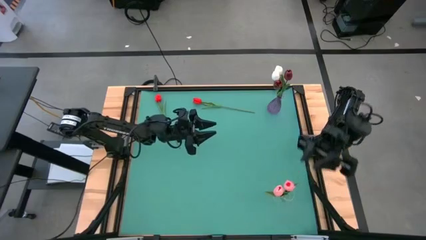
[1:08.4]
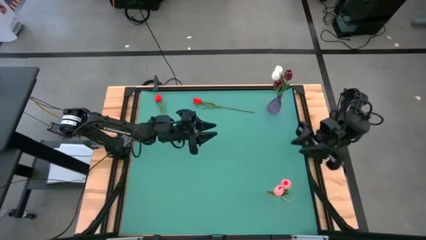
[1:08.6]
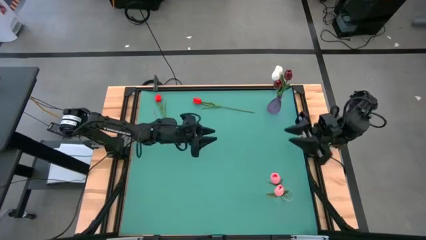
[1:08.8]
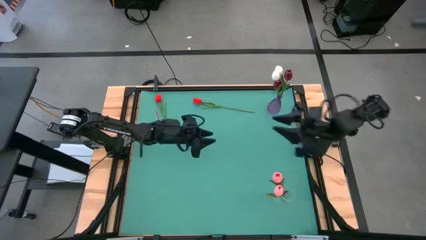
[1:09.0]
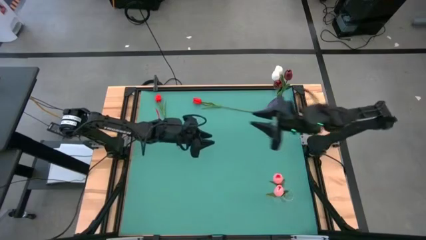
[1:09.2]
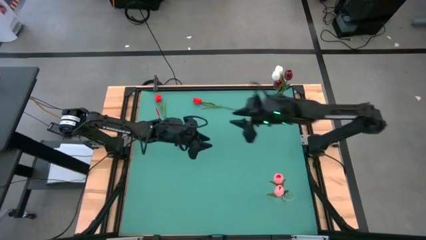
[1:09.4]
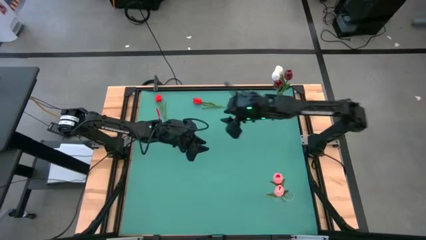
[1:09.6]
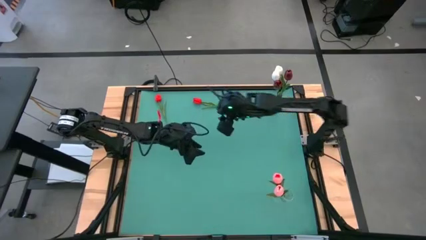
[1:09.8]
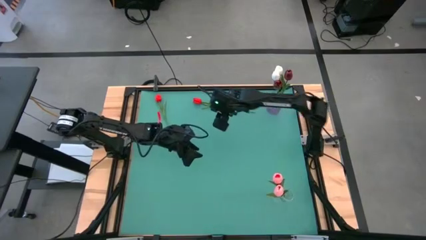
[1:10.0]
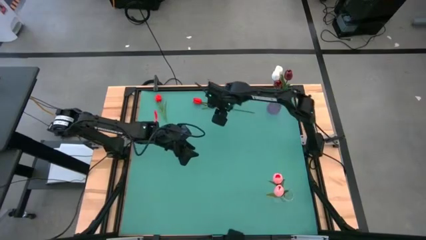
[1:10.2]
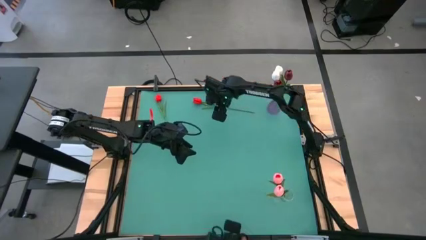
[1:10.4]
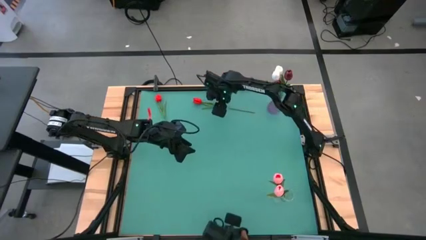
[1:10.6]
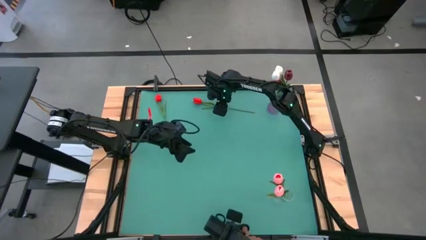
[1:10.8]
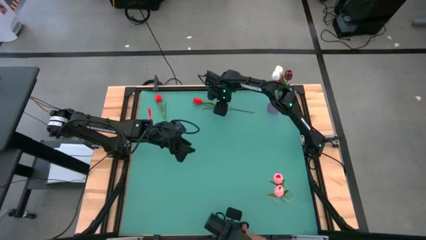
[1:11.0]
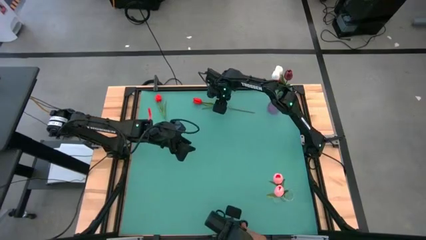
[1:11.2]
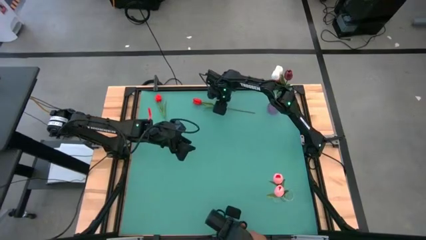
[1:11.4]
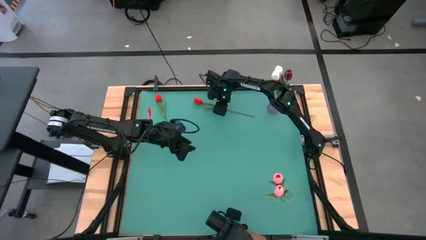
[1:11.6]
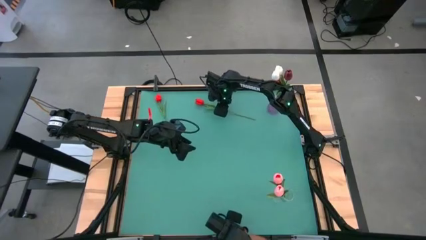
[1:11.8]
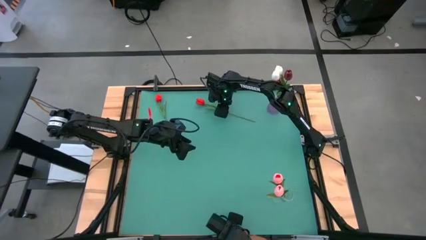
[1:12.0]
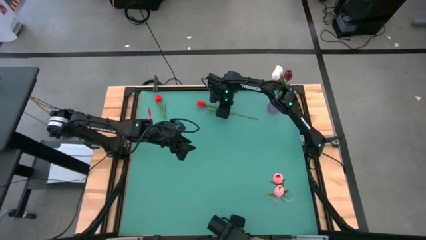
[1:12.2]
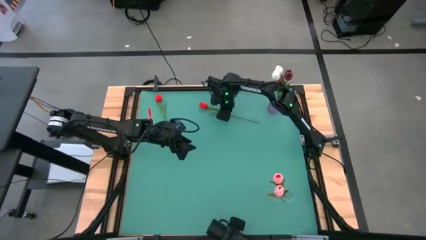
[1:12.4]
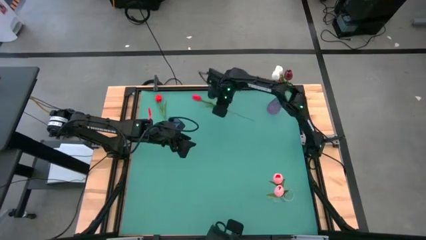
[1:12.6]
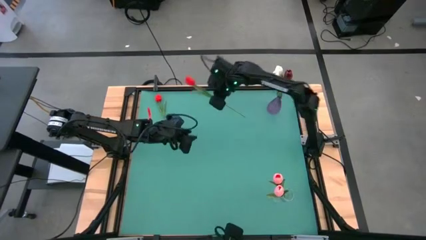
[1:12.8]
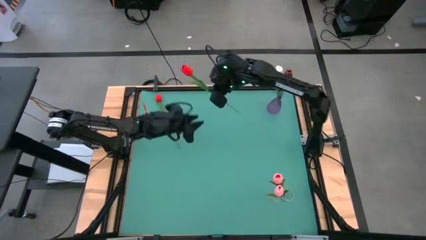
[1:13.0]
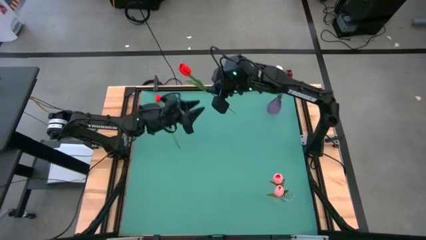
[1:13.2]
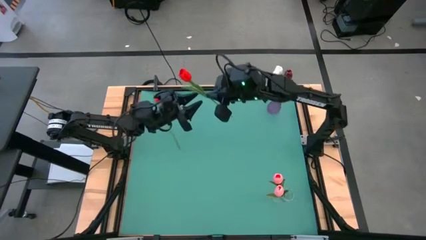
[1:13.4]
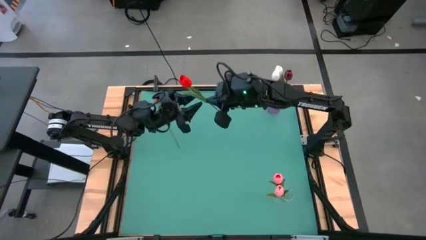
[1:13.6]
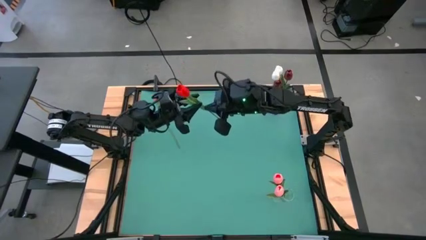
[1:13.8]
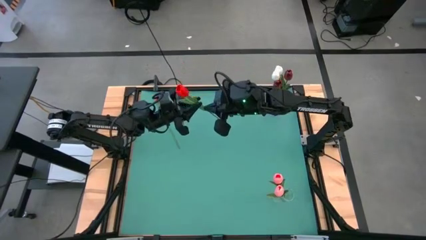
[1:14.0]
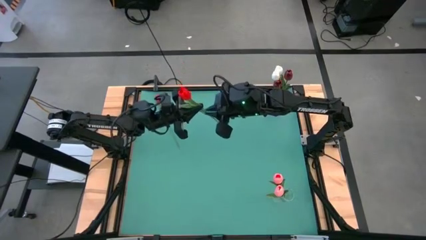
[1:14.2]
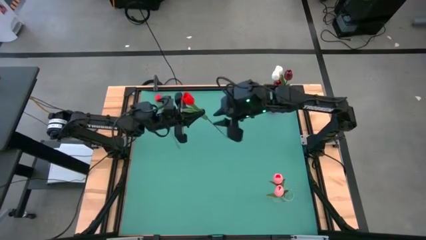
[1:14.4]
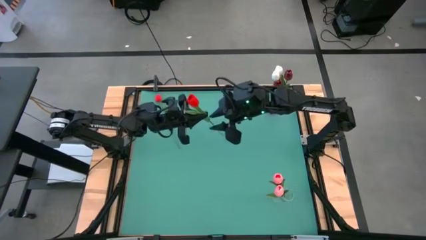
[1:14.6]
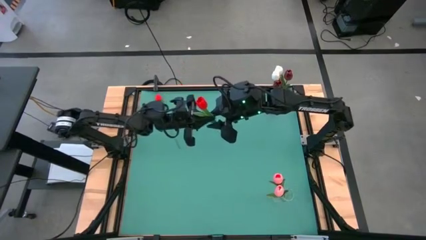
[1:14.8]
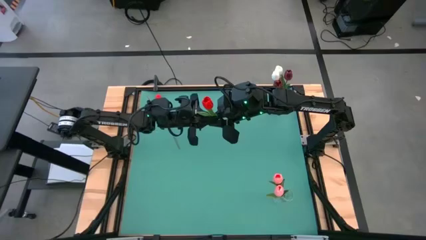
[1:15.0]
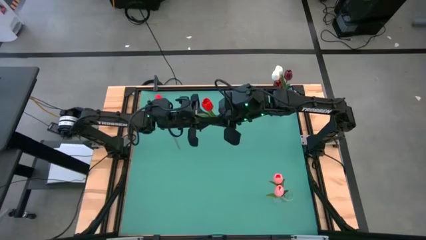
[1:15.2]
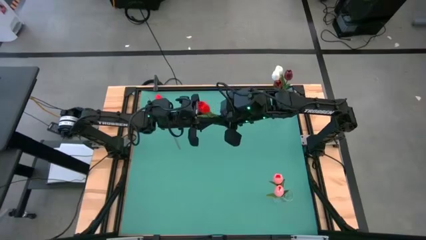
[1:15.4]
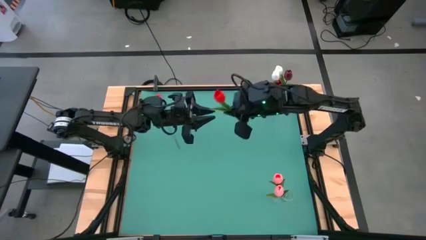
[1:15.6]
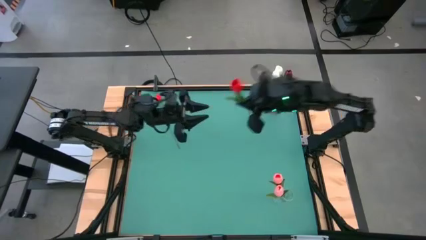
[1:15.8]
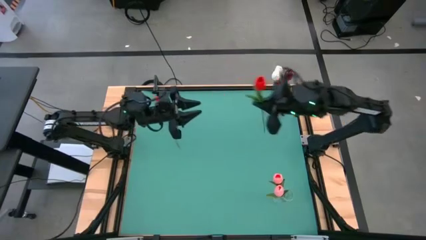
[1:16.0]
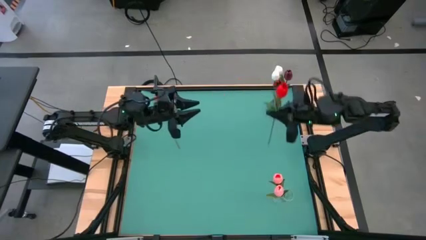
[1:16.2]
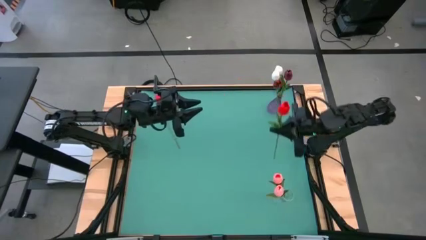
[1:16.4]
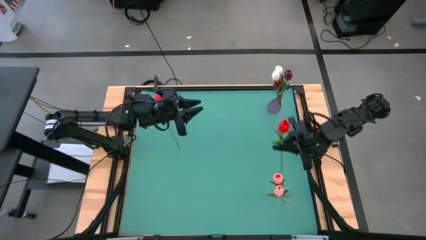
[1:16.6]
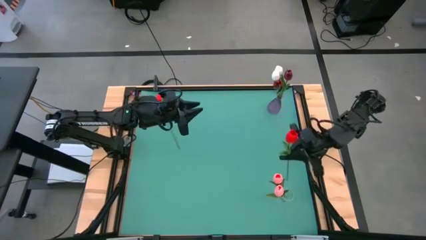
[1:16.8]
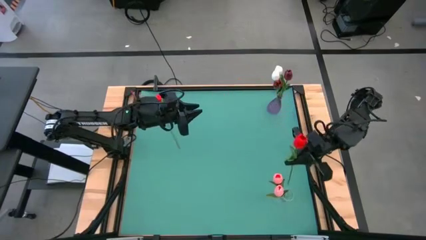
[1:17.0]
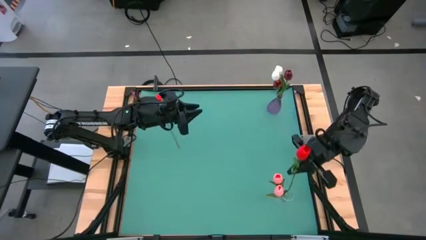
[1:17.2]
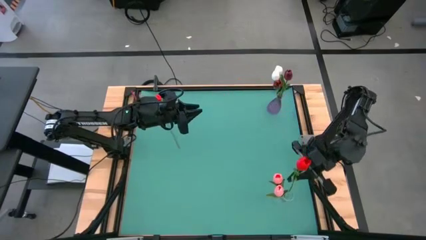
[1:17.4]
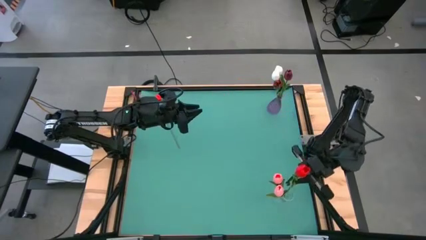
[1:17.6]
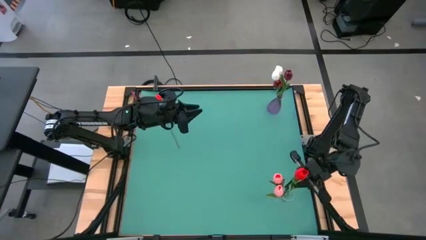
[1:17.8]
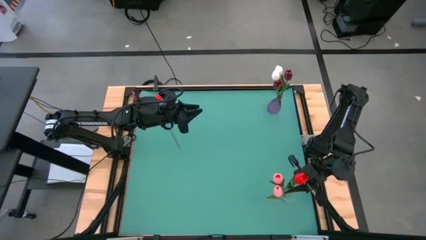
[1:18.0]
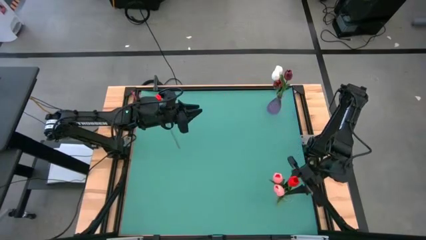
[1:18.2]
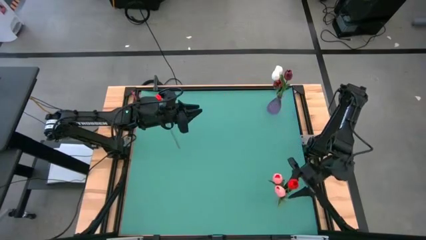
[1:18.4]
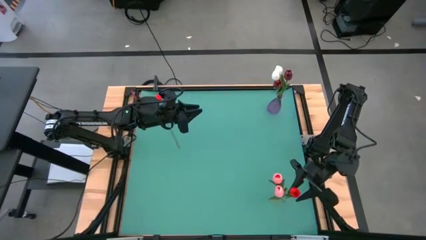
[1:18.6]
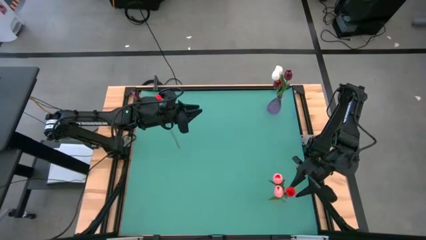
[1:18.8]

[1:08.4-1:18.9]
Task: Sort flowers into vase by color
Put the right red flower into the transparent vase

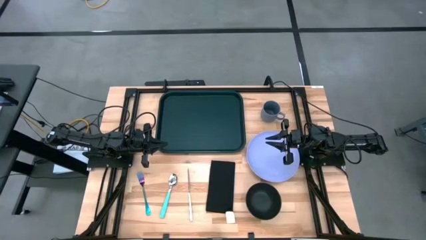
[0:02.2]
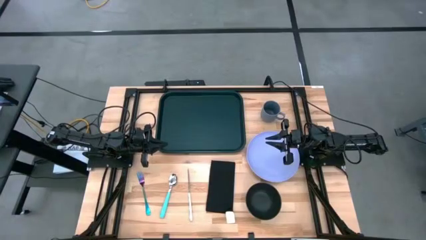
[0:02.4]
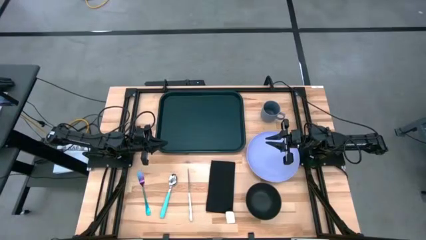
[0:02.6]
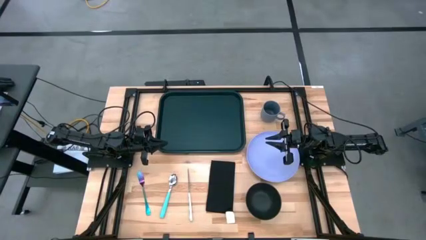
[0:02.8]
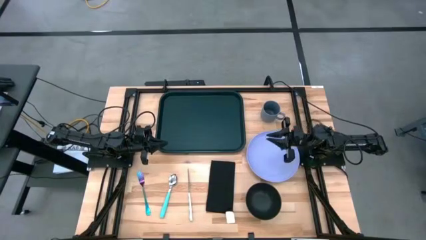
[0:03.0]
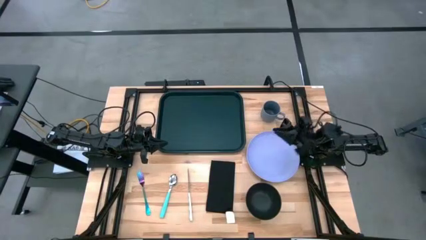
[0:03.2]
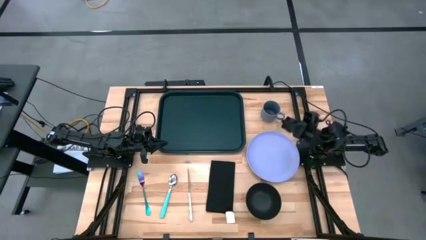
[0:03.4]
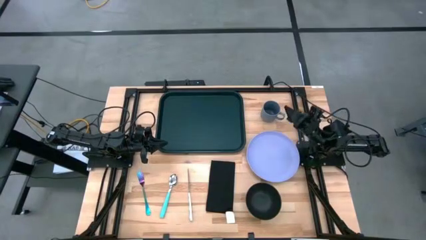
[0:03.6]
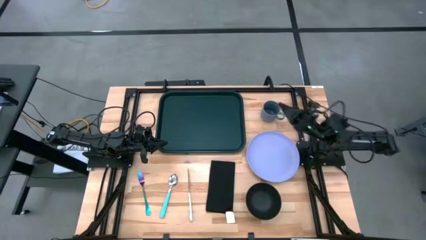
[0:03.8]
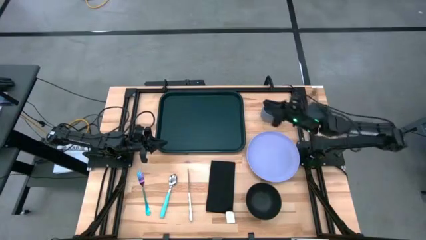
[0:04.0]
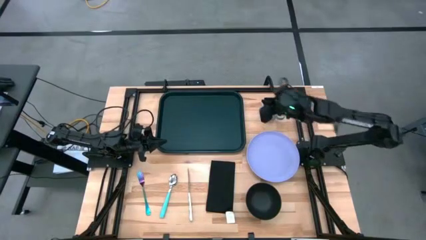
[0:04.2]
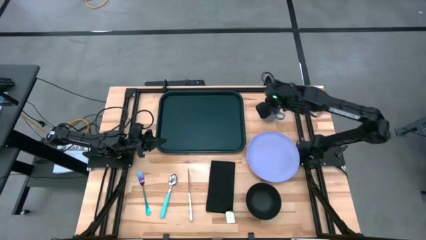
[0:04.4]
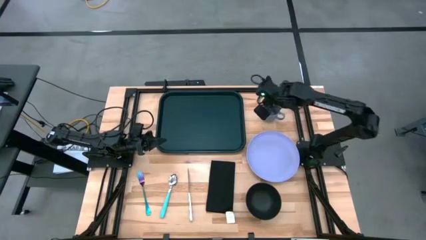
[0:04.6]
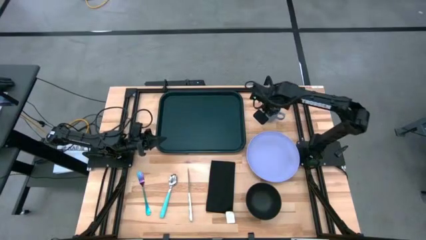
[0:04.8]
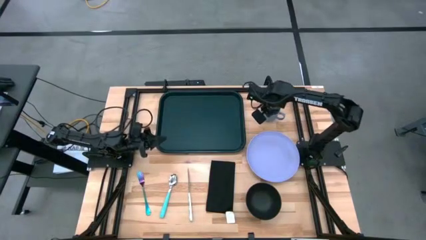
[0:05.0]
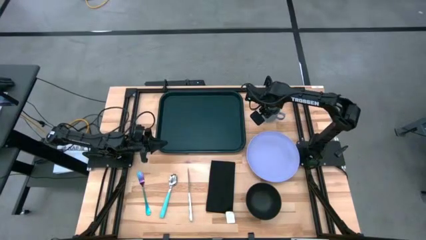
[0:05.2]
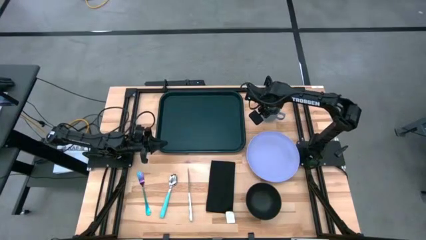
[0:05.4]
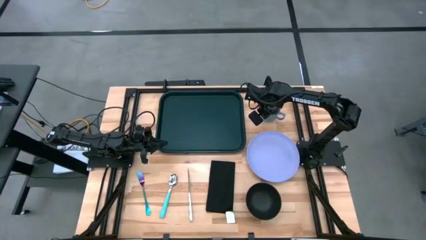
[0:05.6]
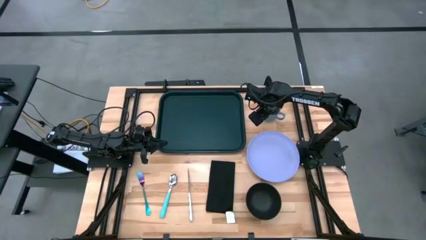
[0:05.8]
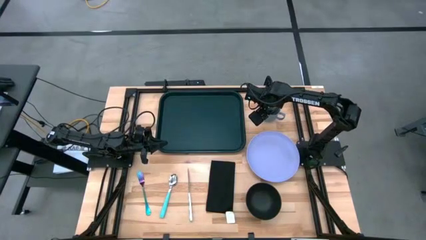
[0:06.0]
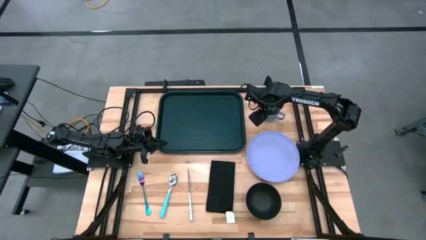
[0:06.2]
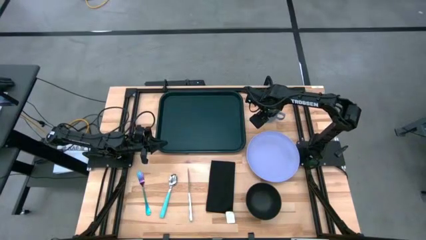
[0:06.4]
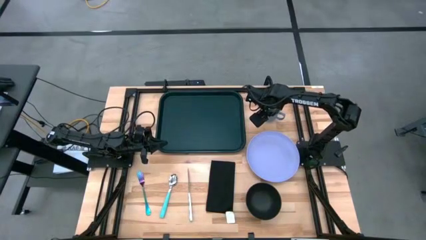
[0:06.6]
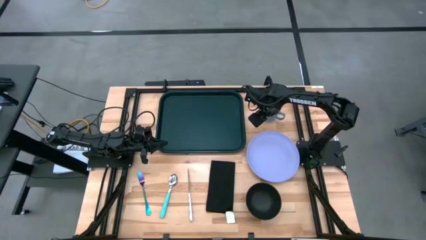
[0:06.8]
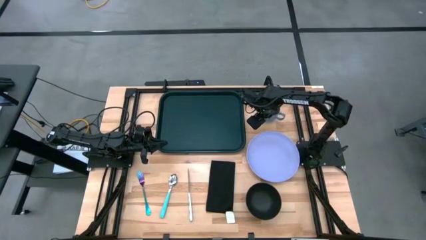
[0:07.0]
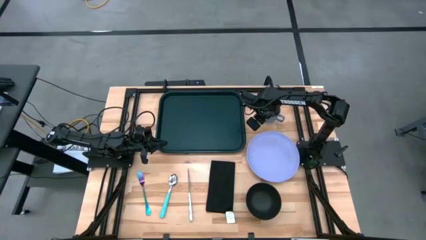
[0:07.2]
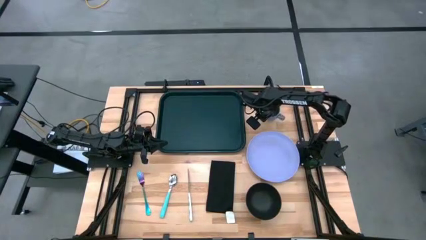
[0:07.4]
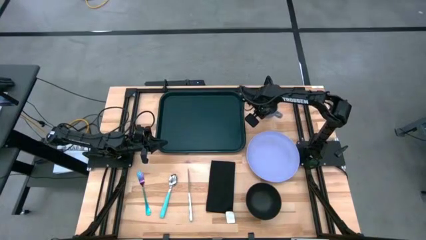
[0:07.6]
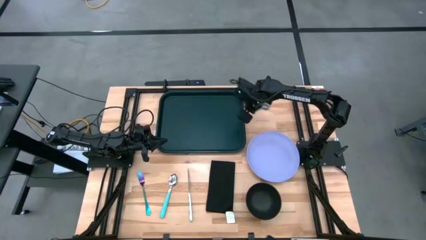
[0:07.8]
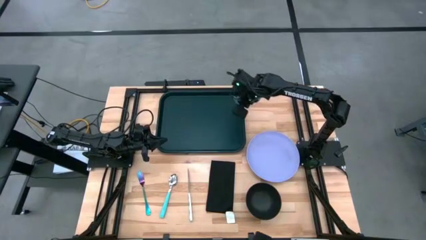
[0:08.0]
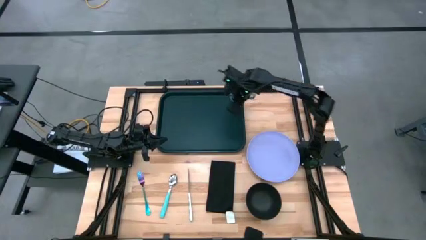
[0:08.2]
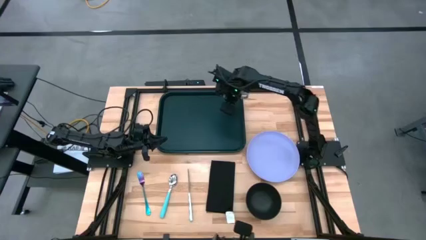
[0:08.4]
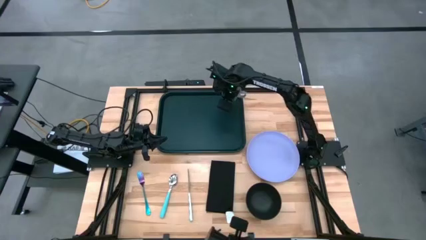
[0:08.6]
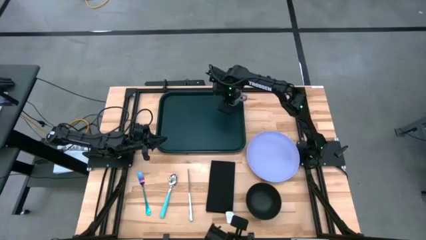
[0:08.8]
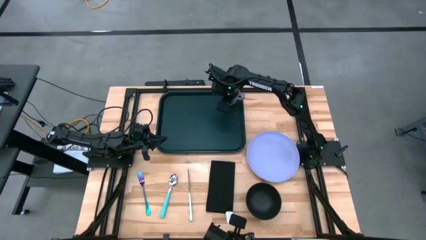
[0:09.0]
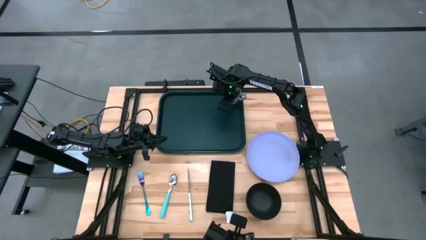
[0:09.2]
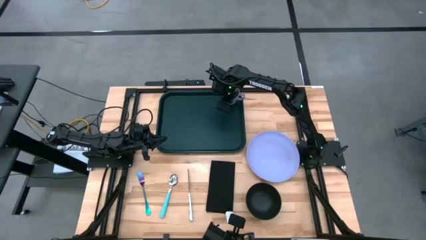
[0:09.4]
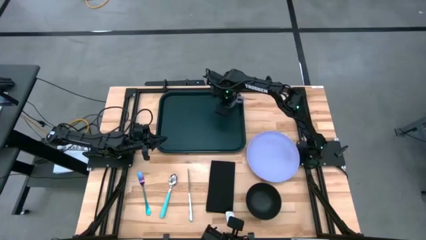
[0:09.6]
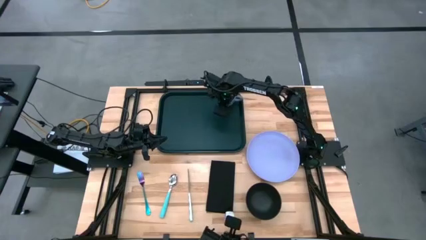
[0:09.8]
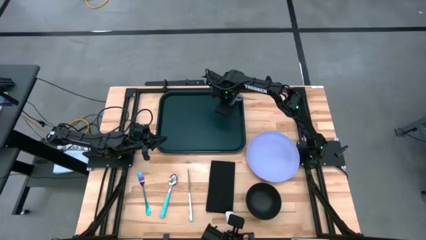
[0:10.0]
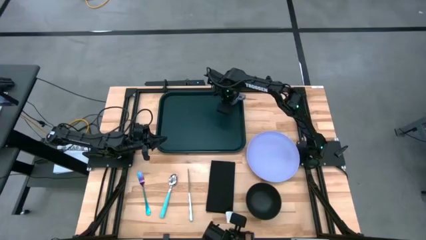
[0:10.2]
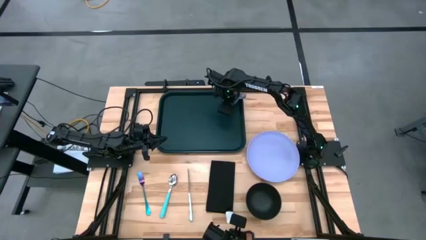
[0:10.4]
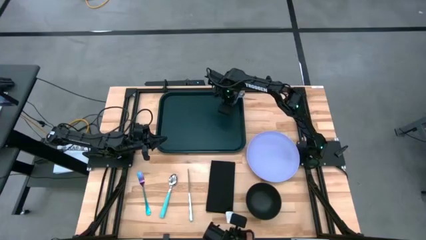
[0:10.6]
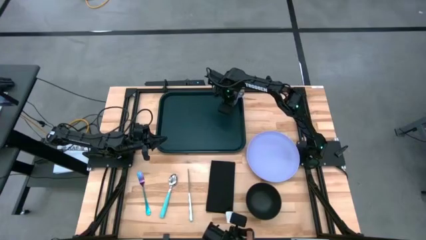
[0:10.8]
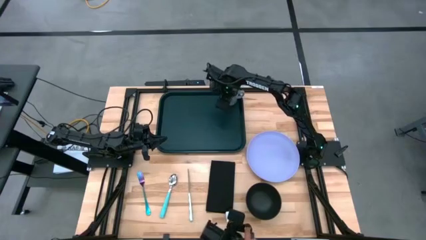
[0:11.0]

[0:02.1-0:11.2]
Task: Set up tray
Put the blue mug to the top right on the black tray
